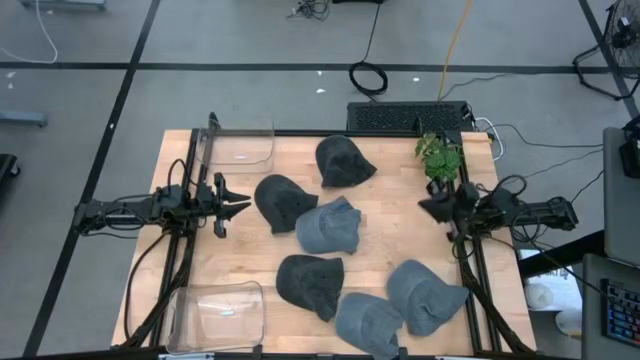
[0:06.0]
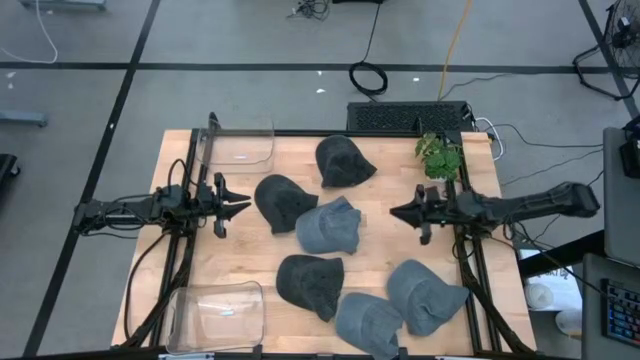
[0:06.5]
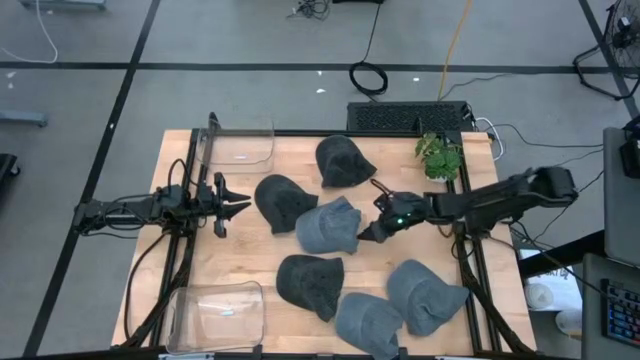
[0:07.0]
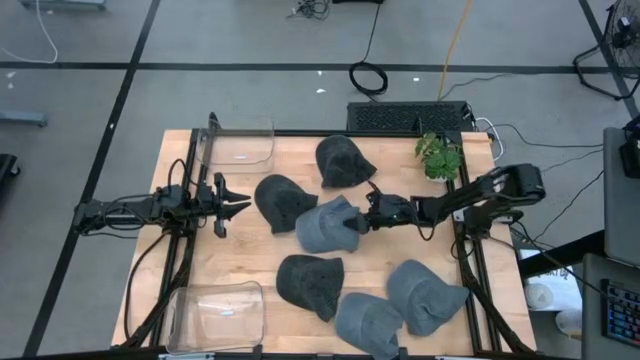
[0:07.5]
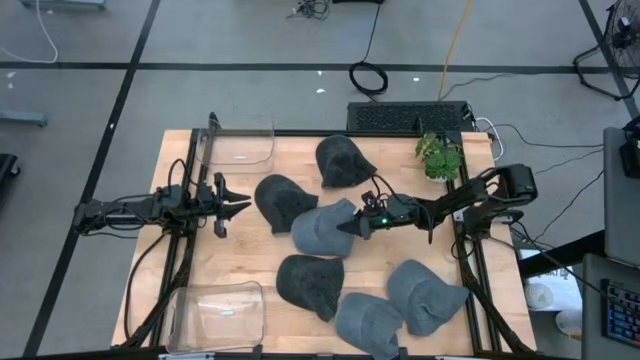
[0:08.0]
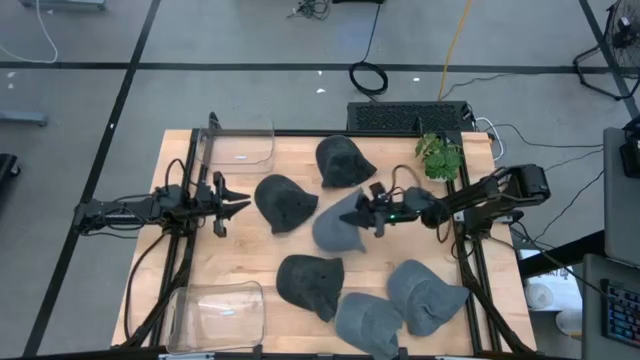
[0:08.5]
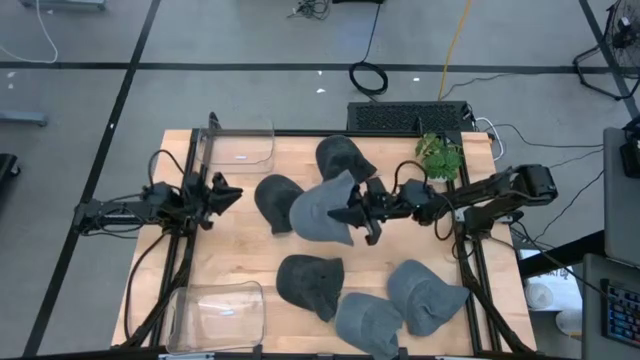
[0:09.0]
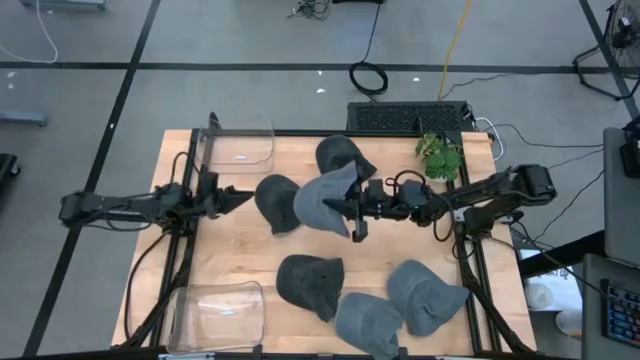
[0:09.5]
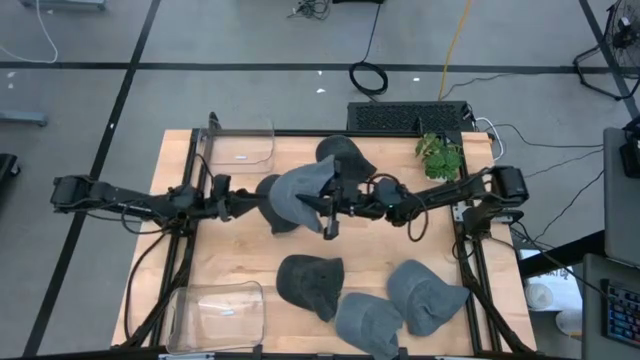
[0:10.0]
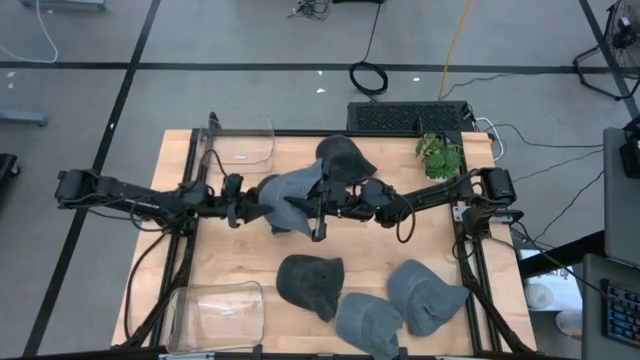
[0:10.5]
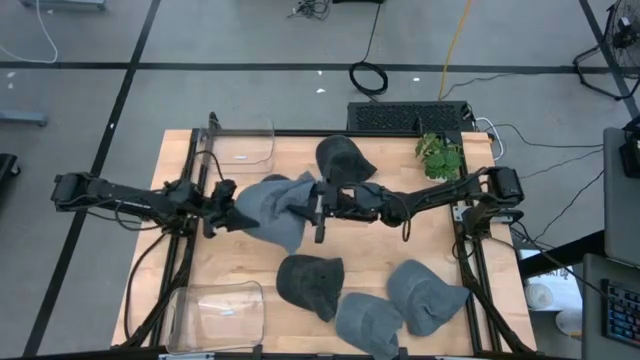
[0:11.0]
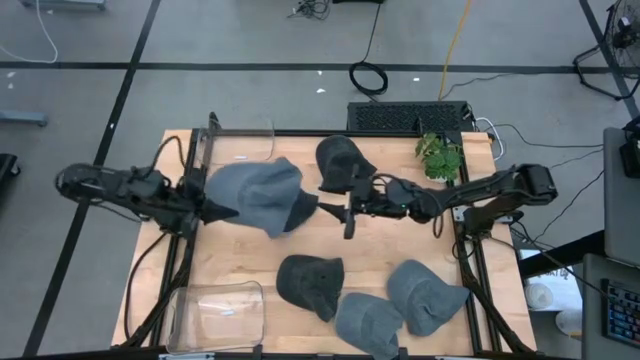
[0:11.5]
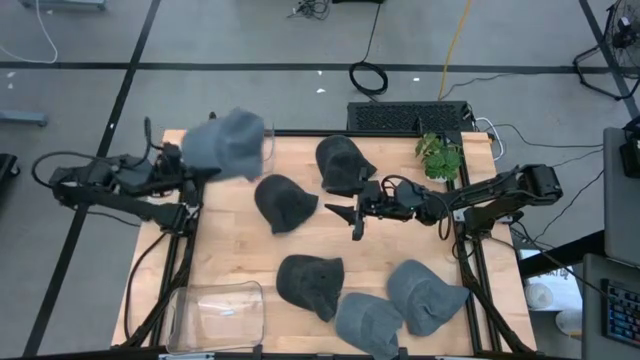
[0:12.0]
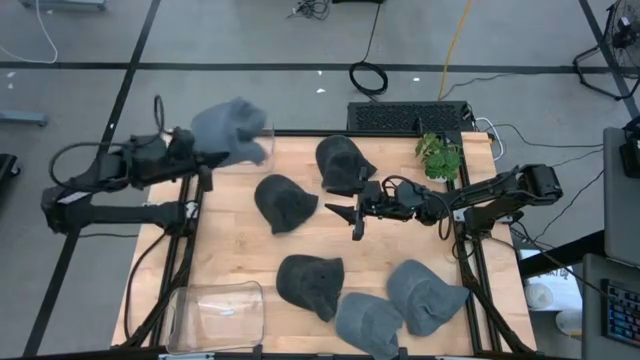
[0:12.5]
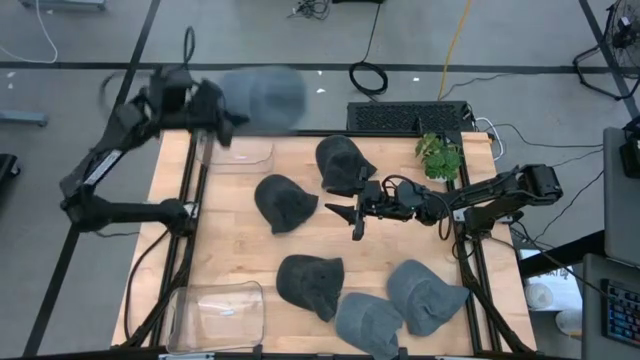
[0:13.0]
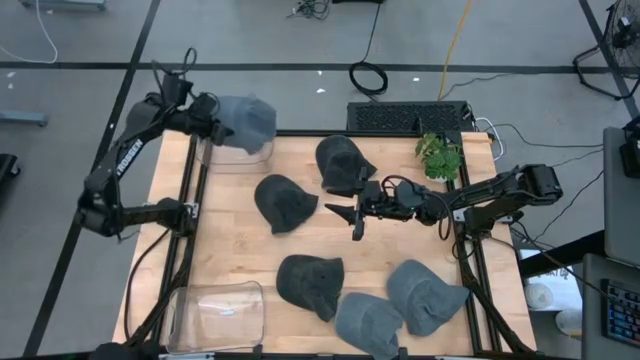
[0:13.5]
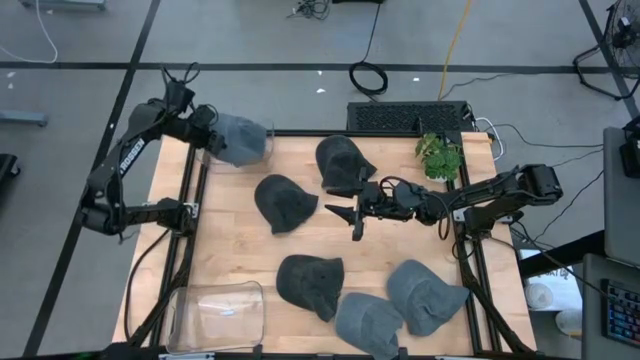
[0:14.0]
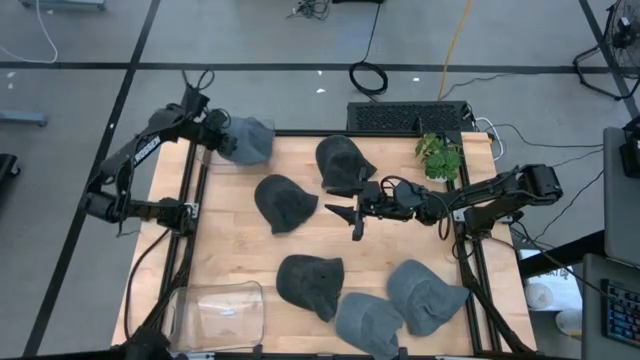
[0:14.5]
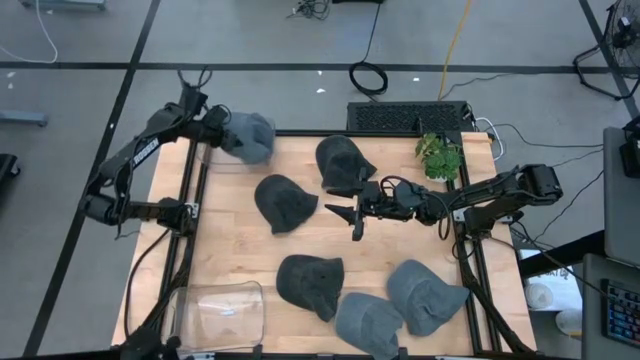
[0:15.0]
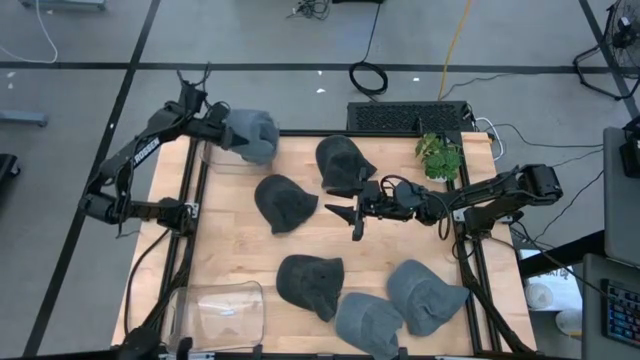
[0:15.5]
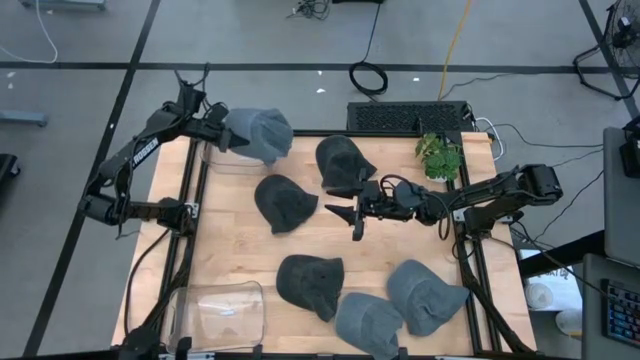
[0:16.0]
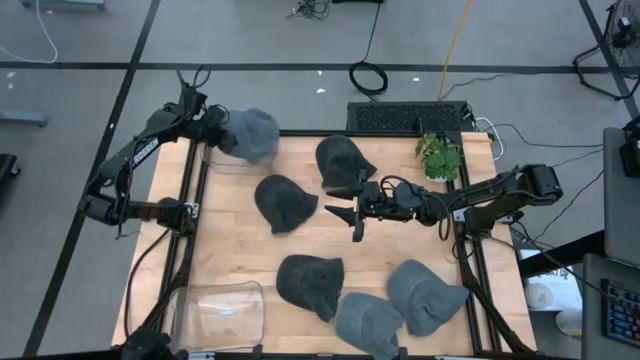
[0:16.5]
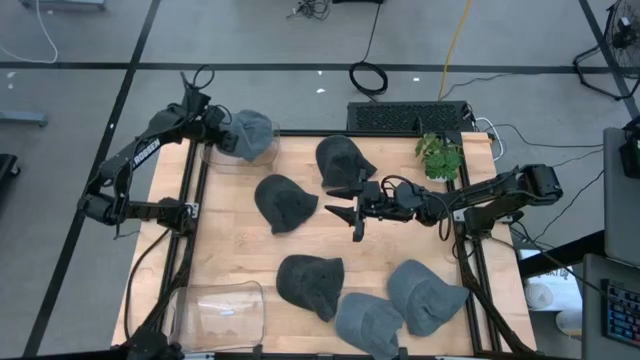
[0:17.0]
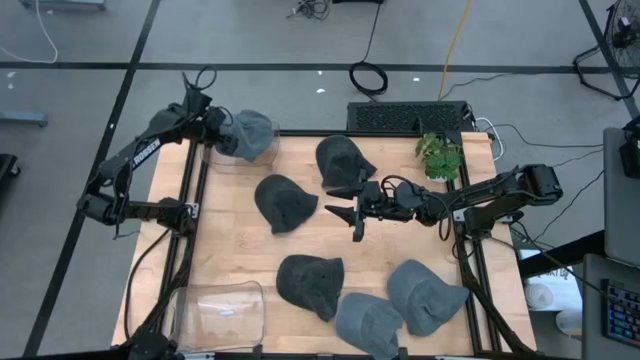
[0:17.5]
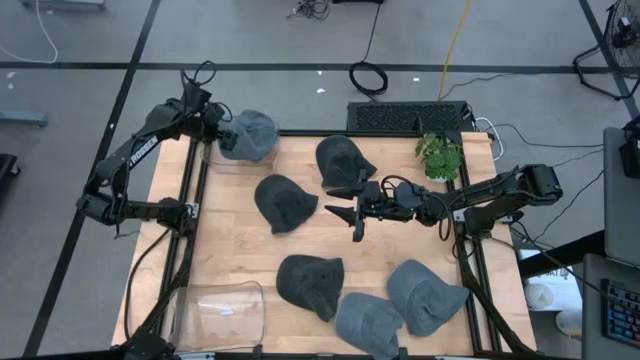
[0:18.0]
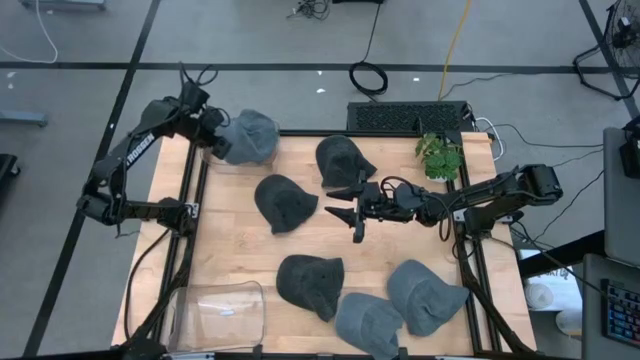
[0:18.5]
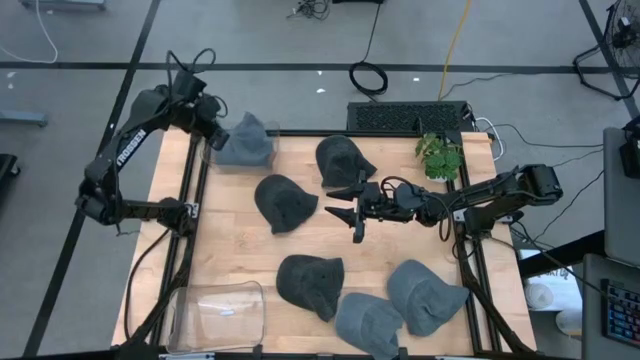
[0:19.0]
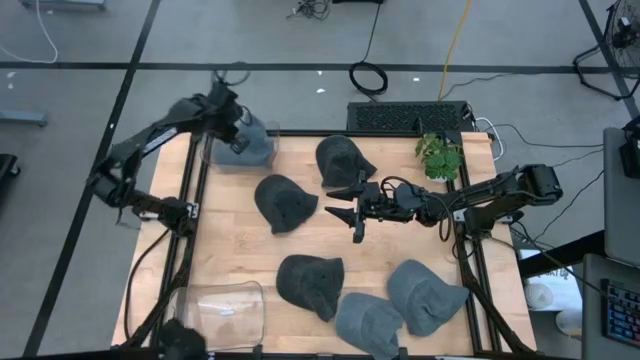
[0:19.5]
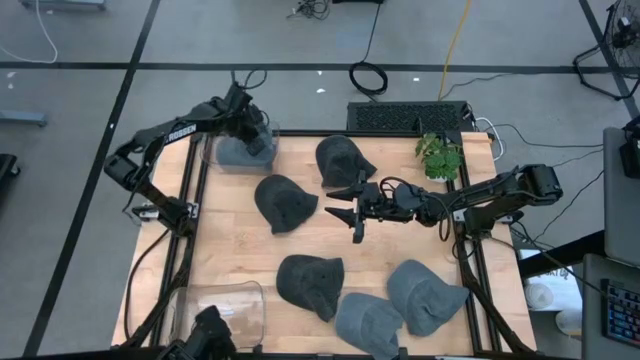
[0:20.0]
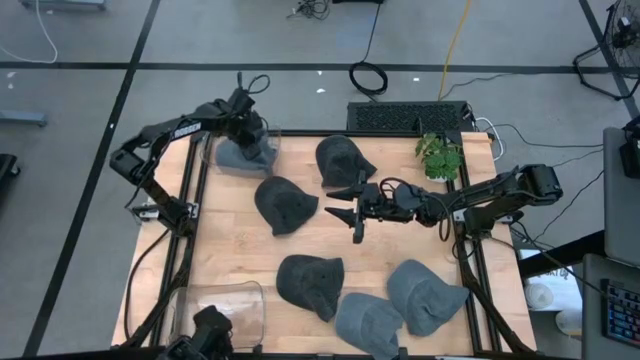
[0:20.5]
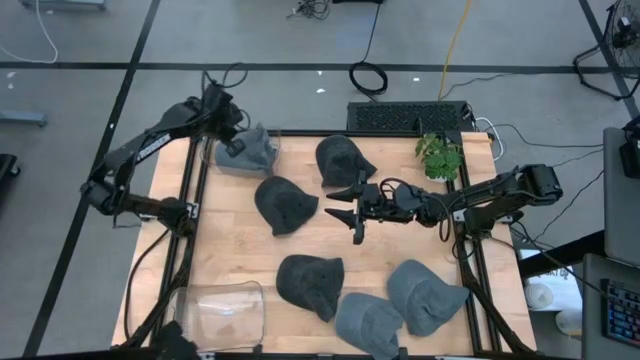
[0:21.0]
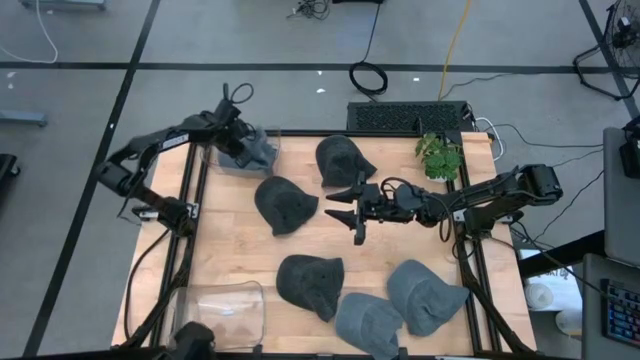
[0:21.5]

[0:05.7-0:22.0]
Task: Pick & Place hat
Put the top gray cap into the top transparent bin

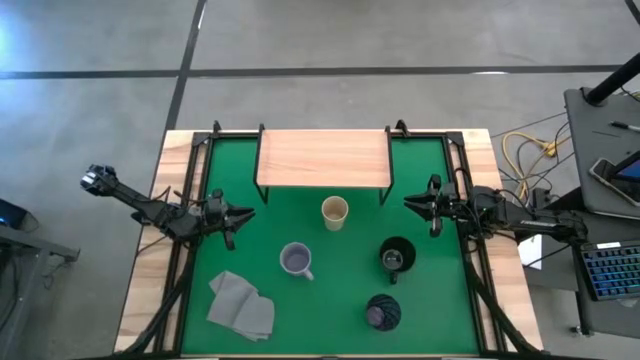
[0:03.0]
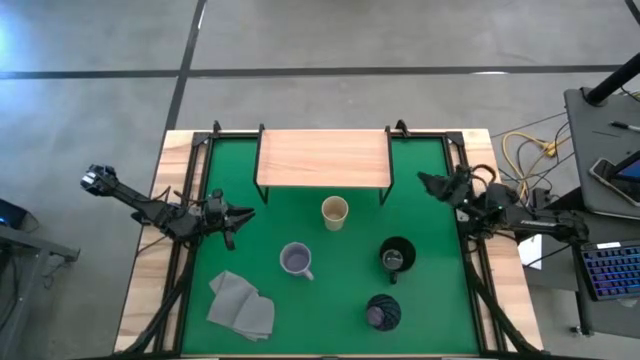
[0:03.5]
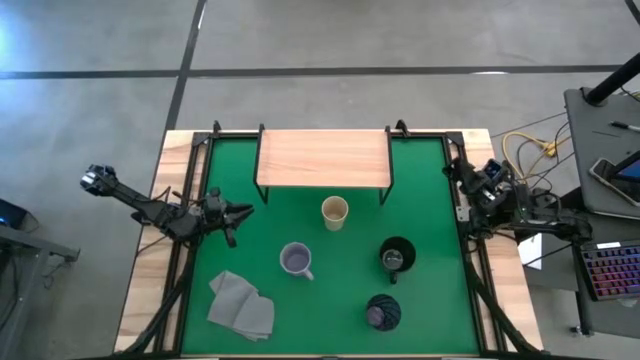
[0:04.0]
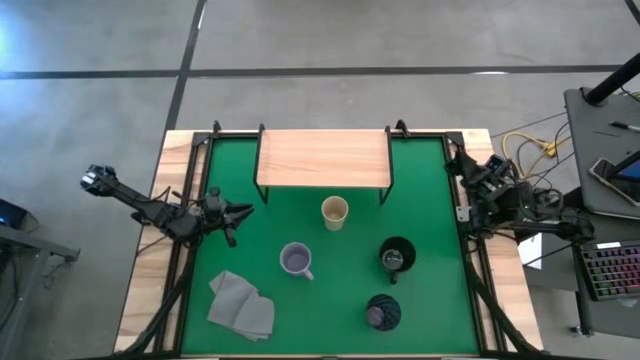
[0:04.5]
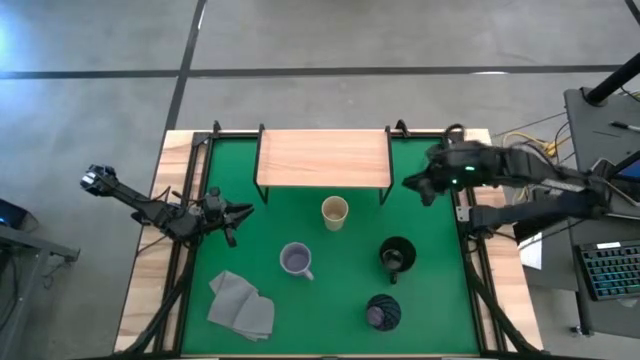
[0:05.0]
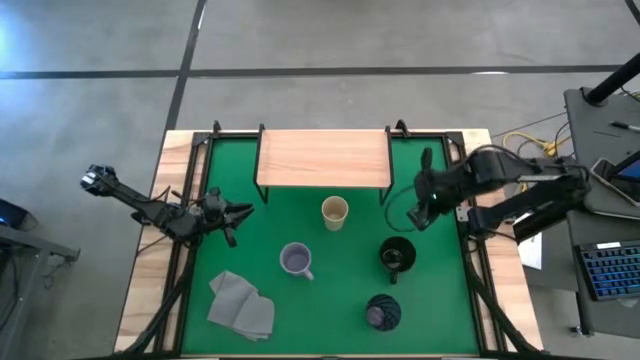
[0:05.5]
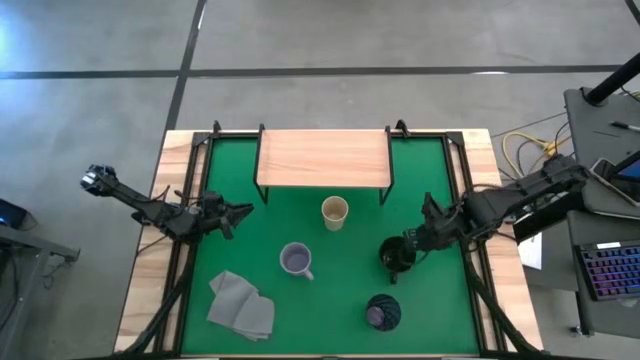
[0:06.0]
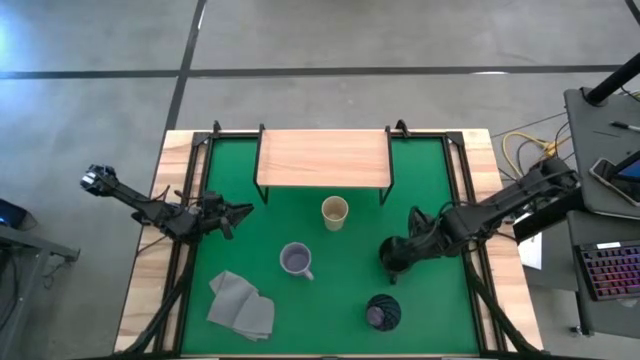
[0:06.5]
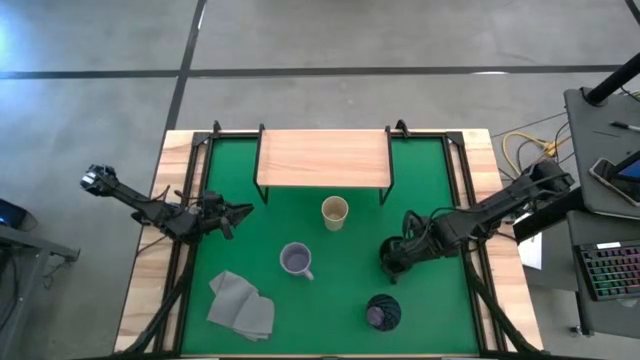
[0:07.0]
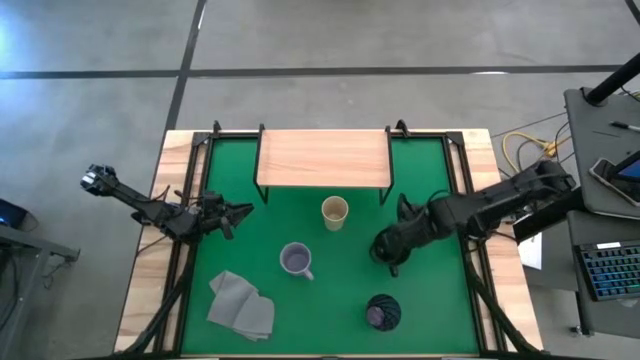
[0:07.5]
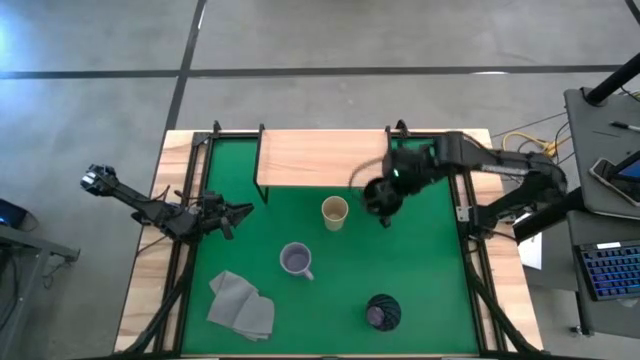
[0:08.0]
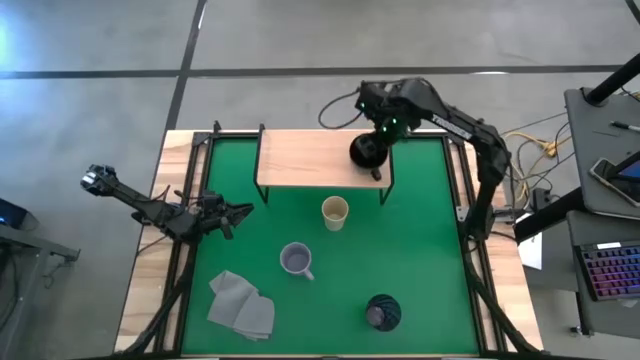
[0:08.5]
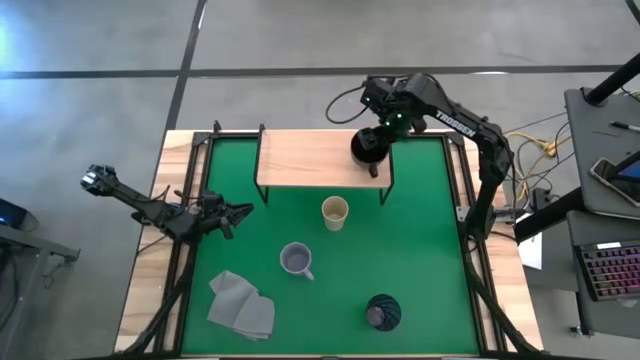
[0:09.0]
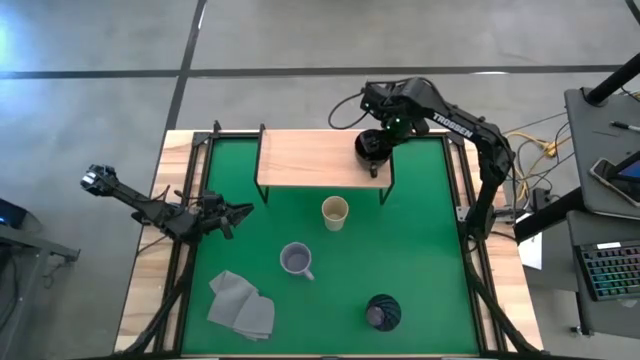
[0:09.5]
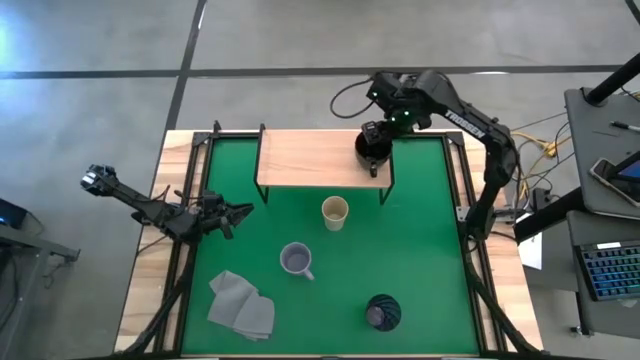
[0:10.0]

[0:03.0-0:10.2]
Task: Stack small to large cups/mugs on shelf
Put the black mug on the shelf
